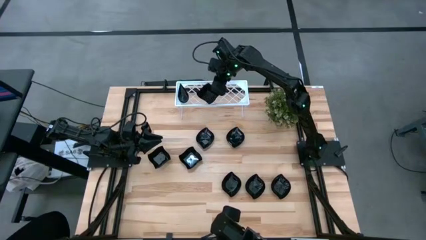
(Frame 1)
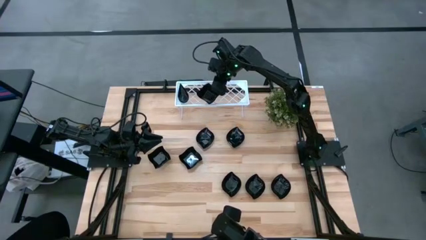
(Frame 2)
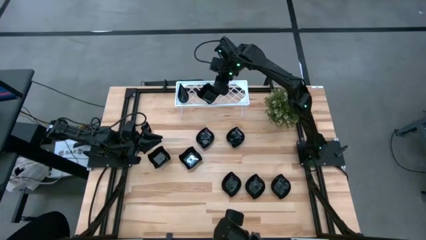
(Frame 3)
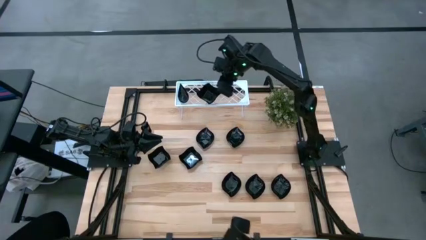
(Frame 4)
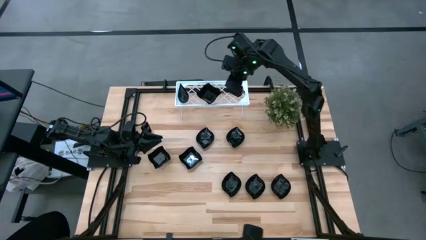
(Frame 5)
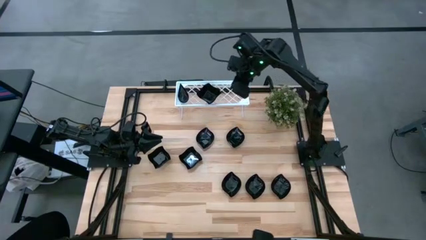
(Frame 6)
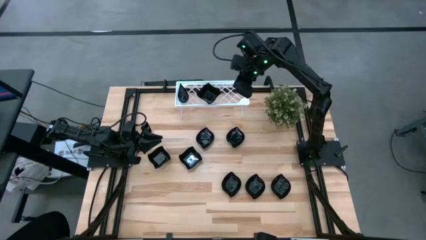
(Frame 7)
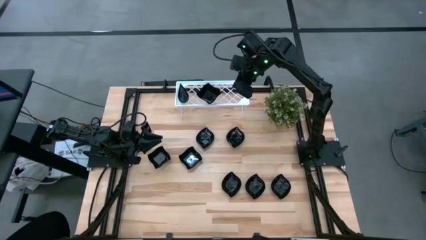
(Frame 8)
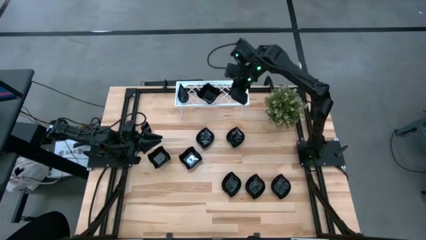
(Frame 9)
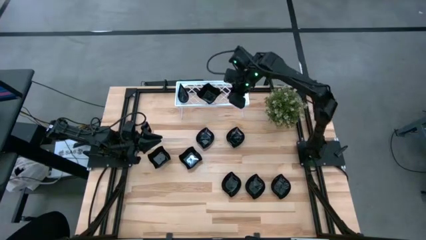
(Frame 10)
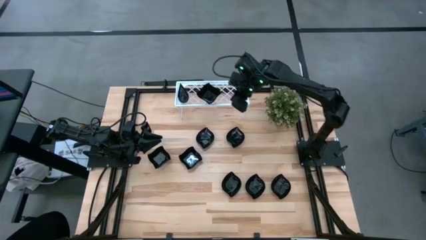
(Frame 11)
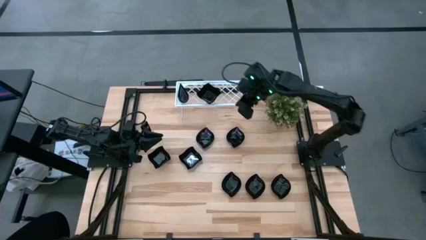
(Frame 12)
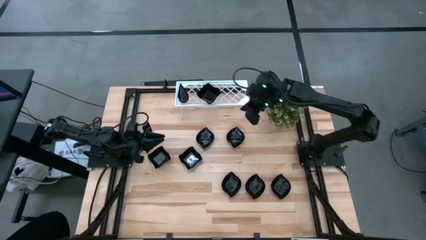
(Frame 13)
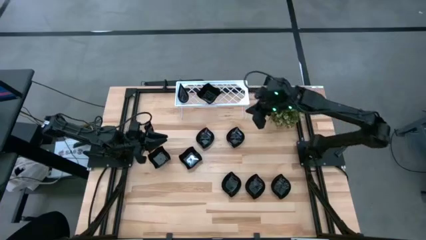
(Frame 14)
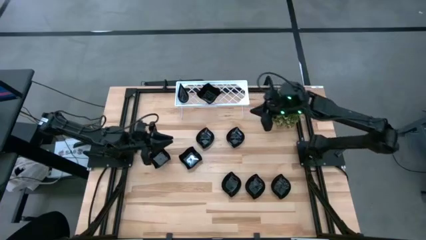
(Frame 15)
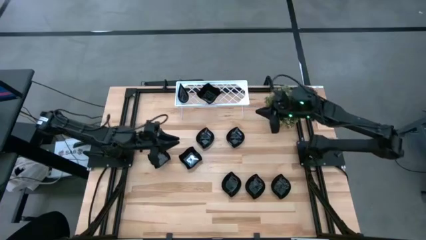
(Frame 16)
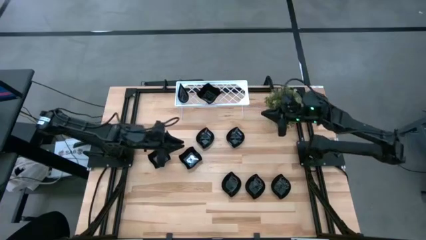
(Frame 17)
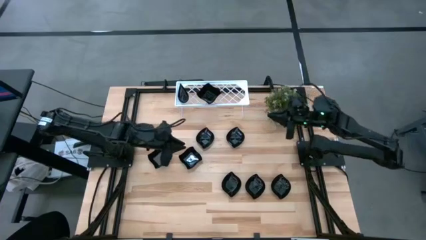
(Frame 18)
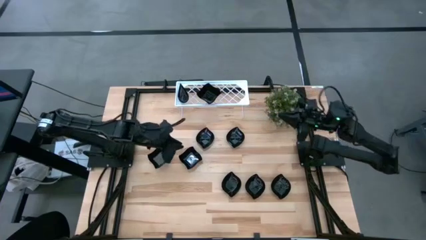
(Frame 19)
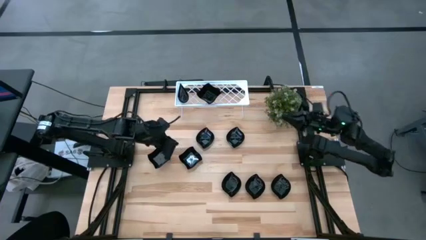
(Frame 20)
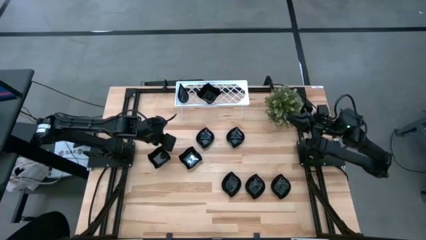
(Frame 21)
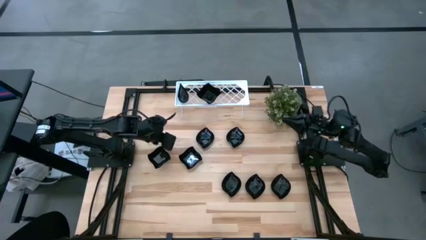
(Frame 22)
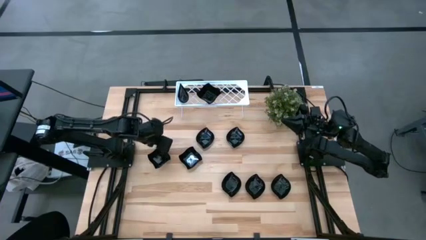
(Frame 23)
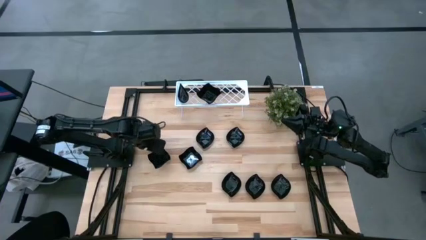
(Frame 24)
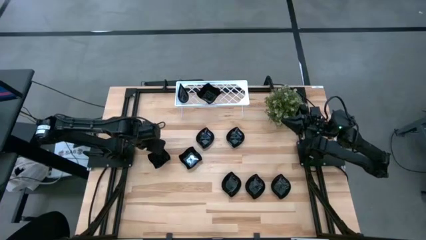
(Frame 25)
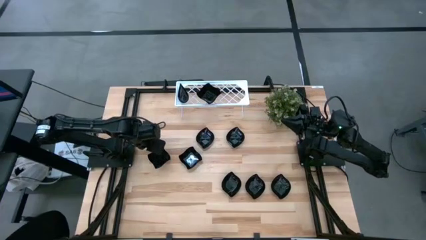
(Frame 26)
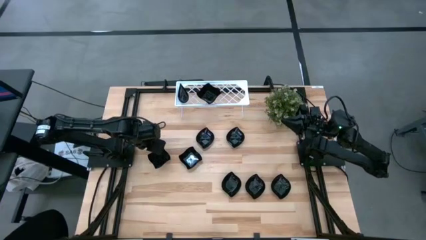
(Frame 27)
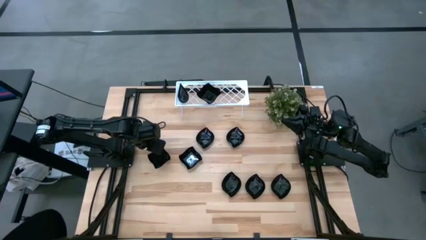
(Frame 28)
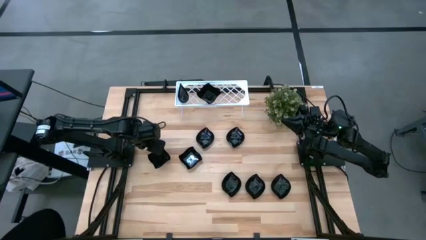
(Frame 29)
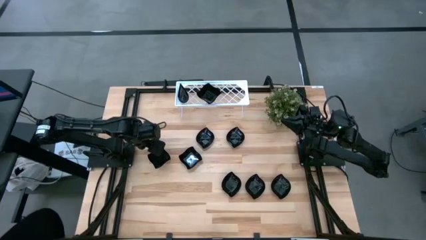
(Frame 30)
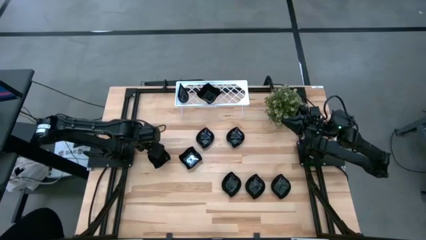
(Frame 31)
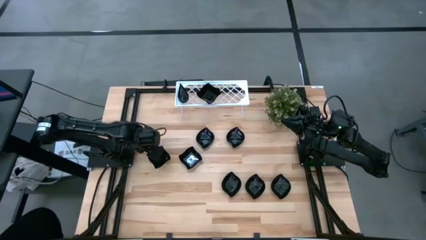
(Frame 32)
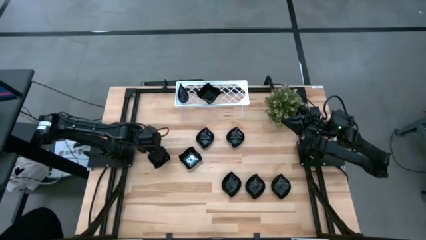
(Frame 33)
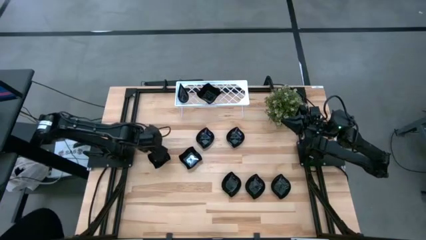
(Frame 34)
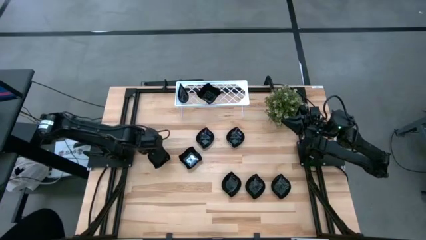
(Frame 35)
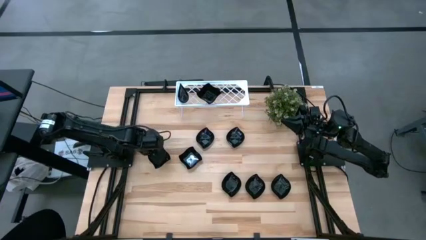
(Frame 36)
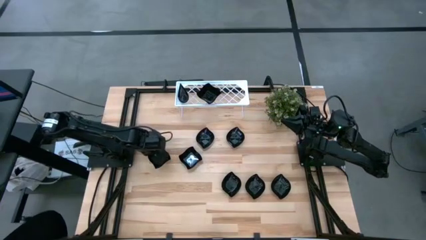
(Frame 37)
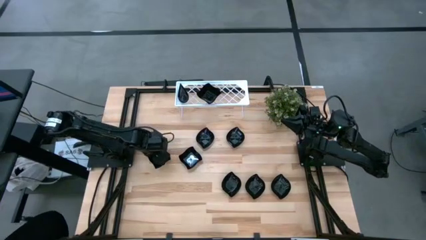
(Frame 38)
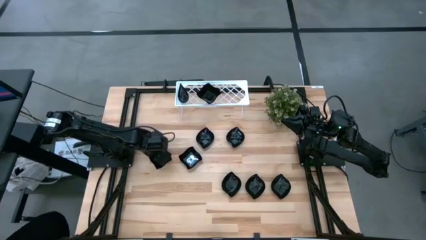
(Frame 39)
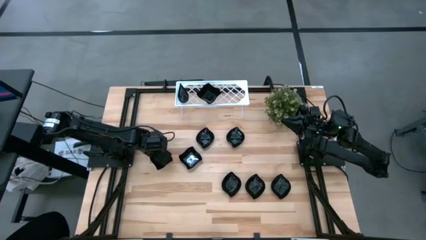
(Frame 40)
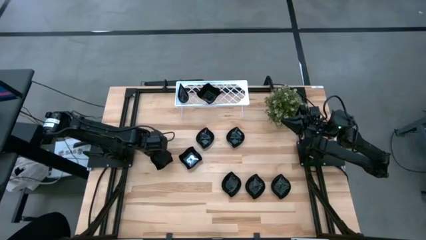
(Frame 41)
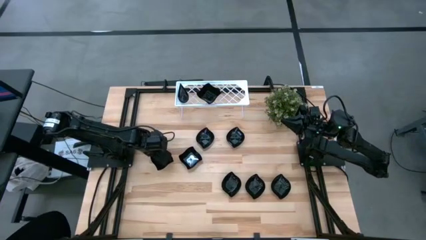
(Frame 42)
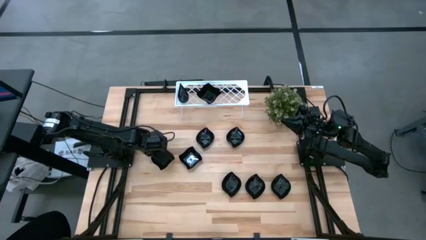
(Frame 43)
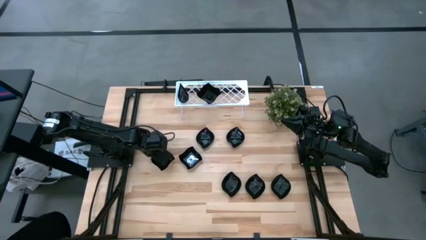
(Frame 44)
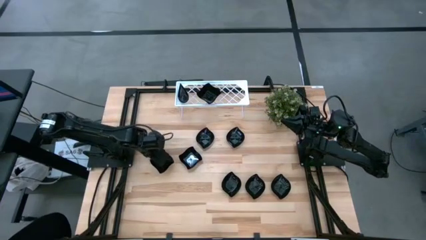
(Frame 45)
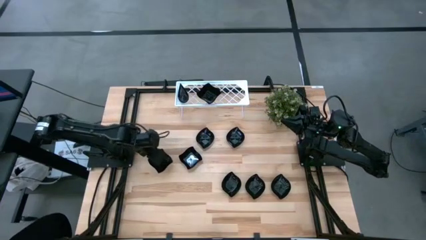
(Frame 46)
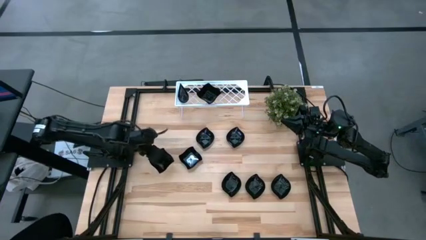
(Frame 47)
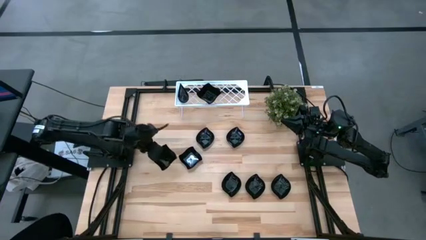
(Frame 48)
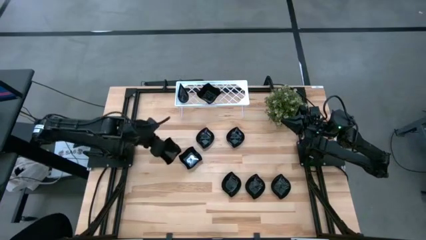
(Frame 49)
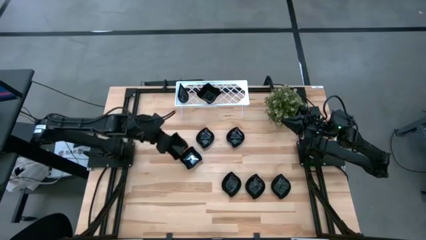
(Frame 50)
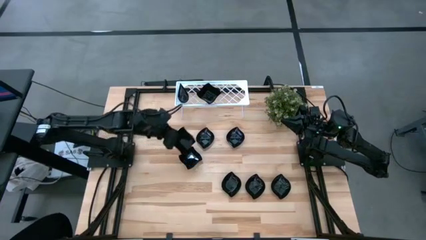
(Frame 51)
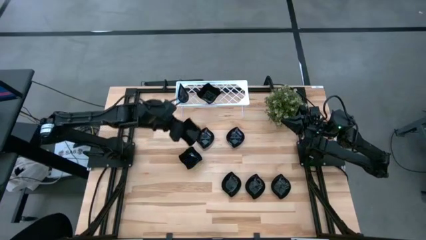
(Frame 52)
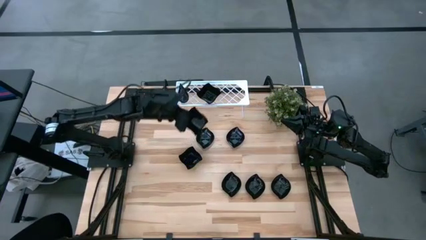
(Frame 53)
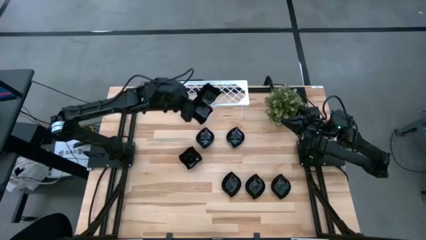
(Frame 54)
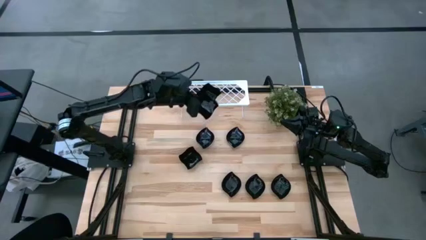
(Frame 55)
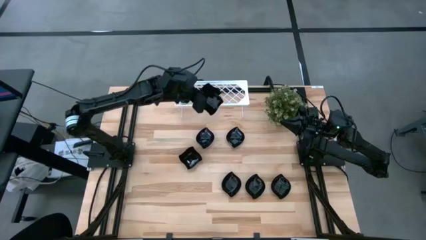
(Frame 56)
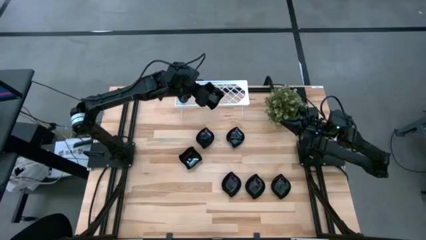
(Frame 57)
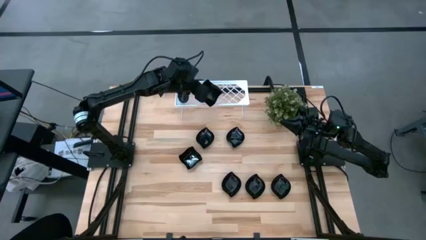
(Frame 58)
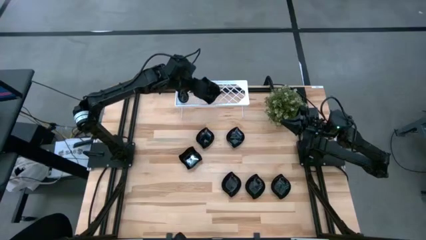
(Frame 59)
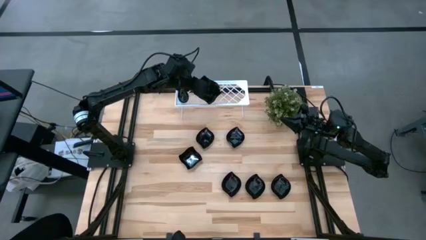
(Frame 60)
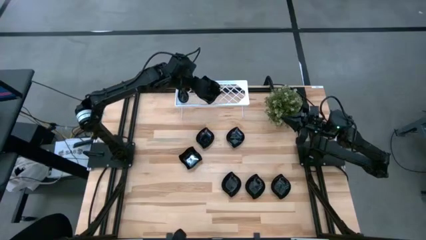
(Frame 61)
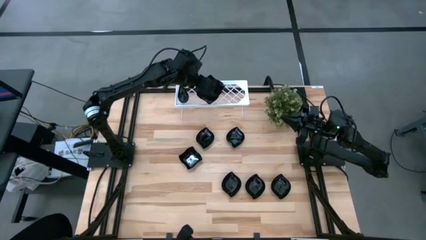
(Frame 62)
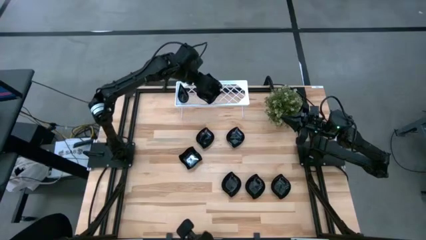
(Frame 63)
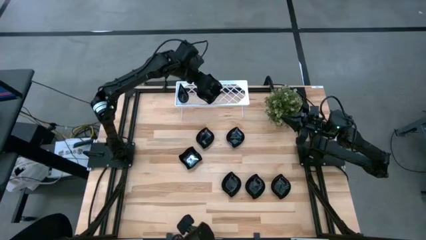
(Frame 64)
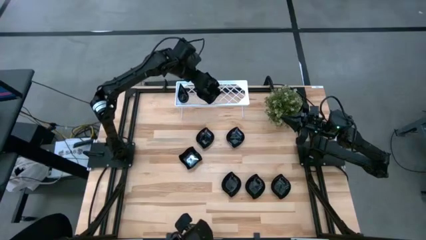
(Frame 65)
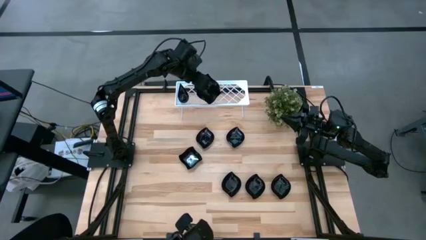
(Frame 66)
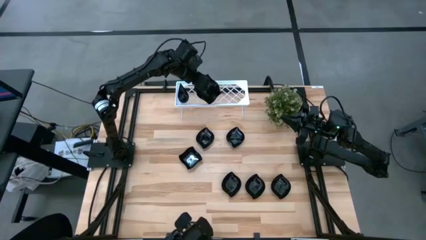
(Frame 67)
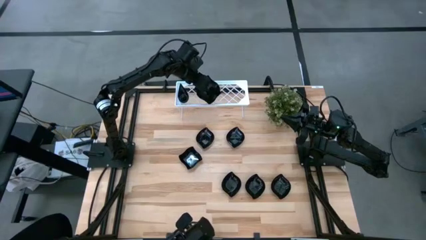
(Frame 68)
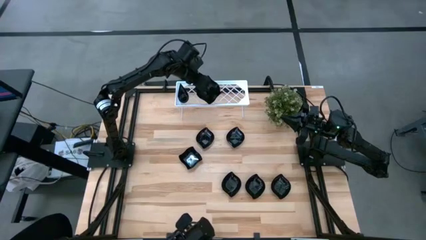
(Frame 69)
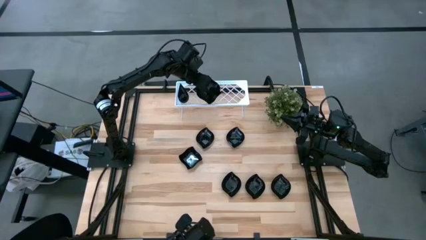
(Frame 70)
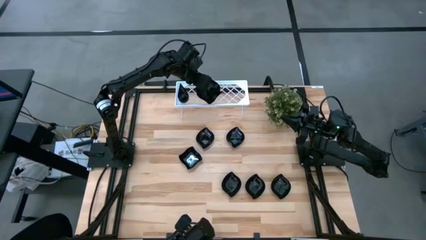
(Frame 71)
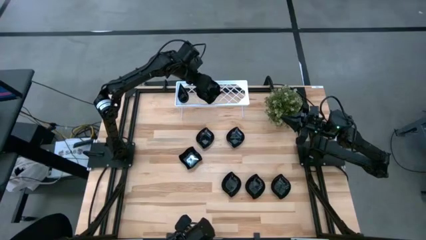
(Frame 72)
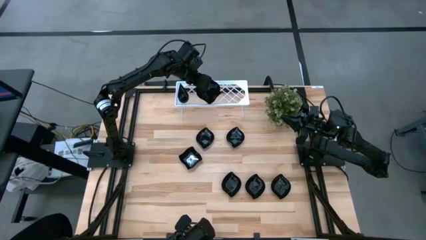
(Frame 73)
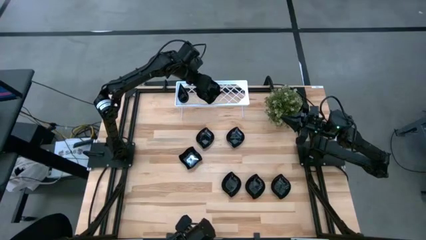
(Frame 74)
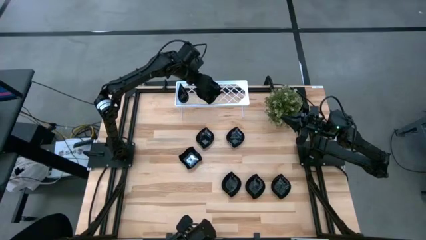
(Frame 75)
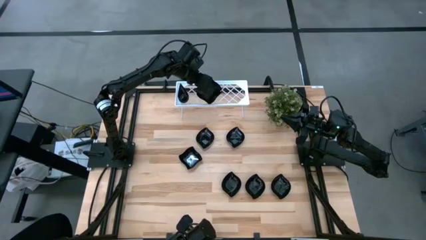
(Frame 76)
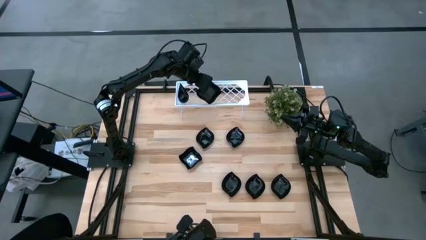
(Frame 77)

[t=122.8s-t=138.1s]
Task: Pick & Place Mini shaped plates
Stack the distorted square-shaped plate on top of the distorted square-shaped plate on the shelf

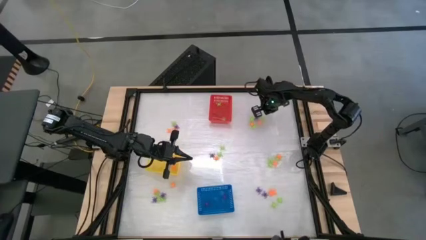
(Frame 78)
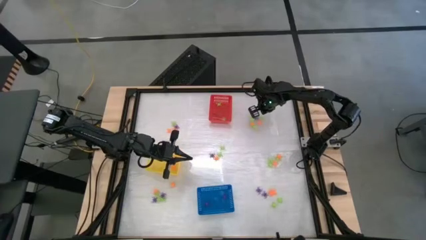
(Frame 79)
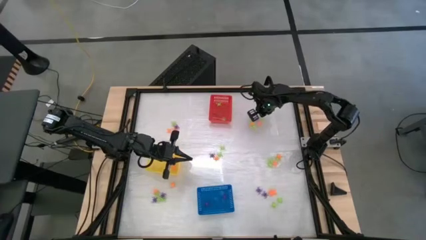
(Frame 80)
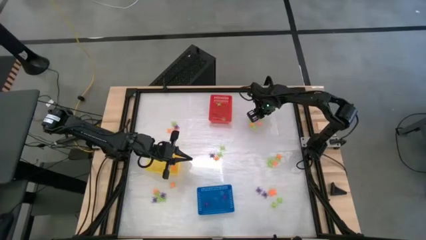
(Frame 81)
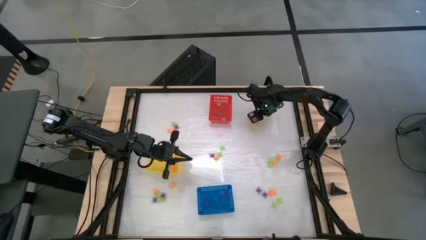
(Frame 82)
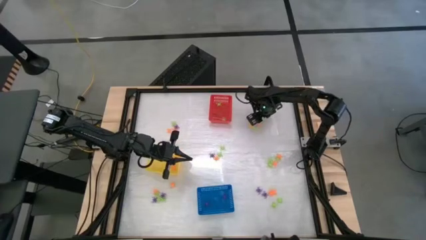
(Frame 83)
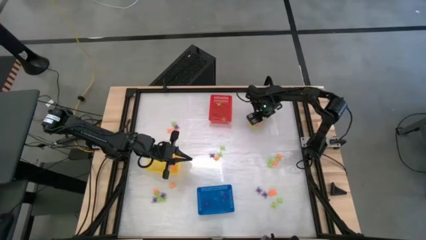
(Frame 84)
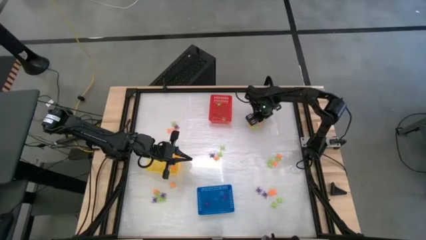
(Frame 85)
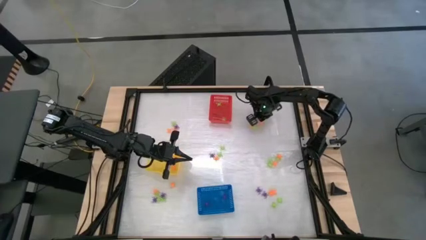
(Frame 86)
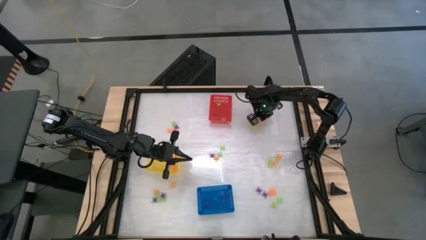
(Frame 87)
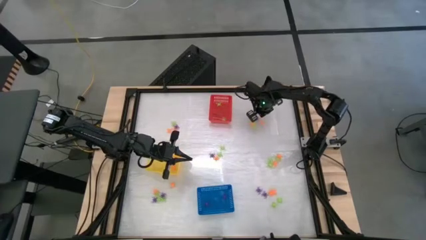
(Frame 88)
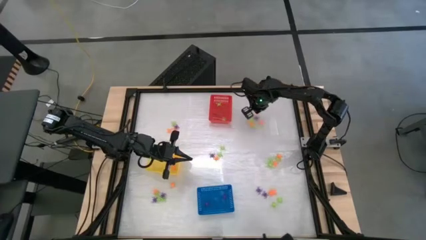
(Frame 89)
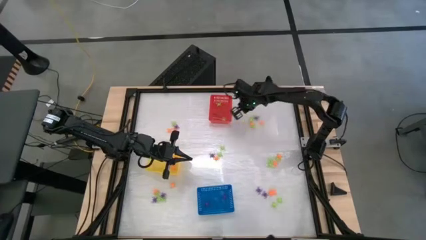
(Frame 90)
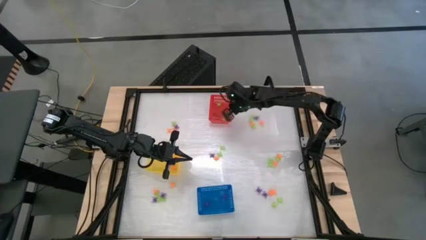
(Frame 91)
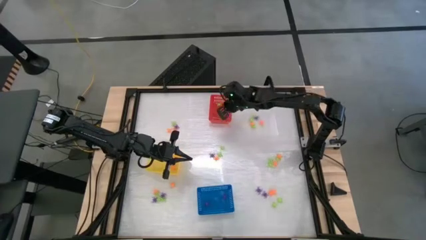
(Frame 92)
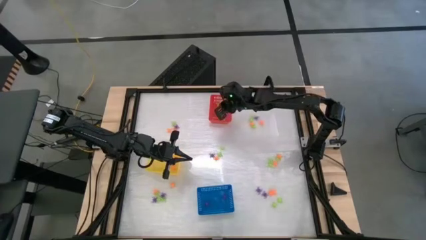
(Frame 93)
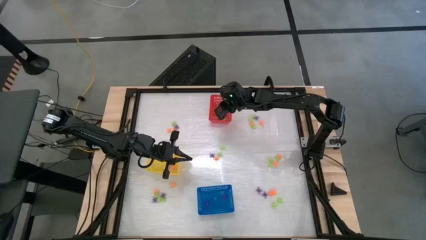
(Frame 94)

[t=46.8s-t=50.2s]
Task: Sort Halloween decoration
Put the green spider toy into the red basket
